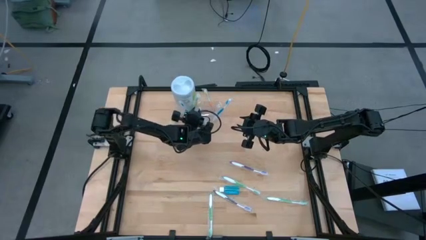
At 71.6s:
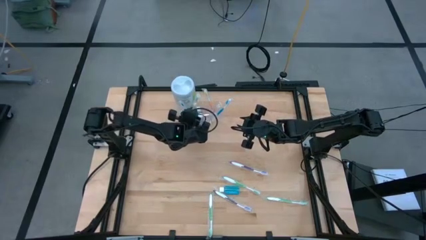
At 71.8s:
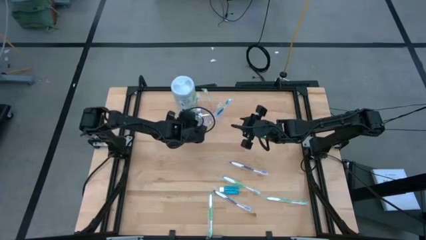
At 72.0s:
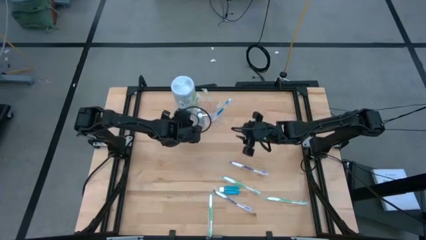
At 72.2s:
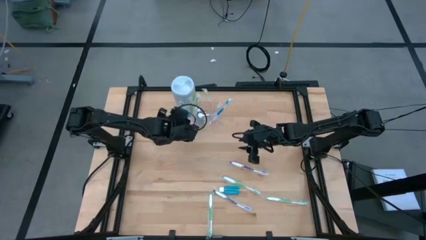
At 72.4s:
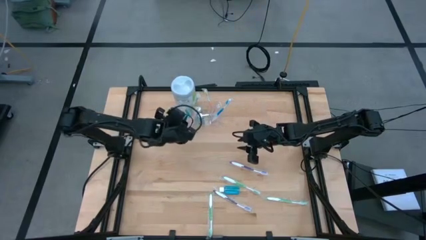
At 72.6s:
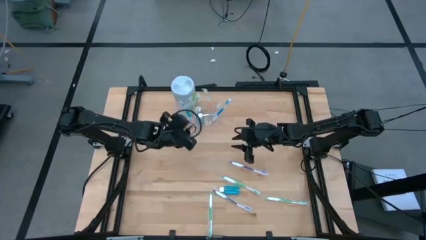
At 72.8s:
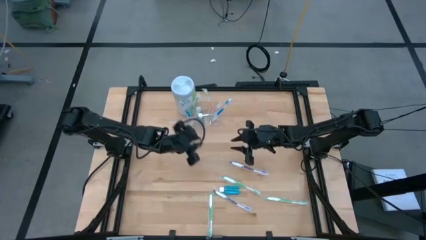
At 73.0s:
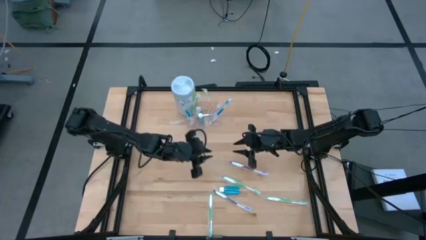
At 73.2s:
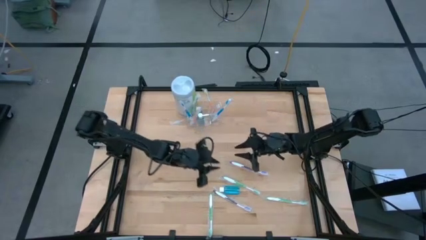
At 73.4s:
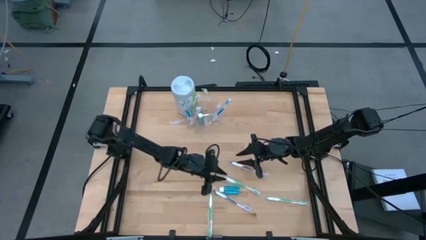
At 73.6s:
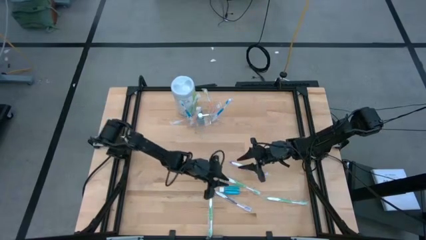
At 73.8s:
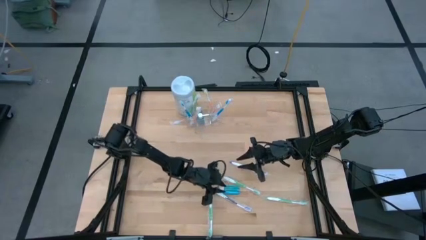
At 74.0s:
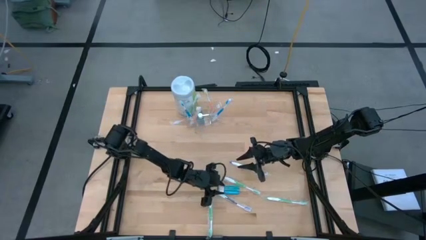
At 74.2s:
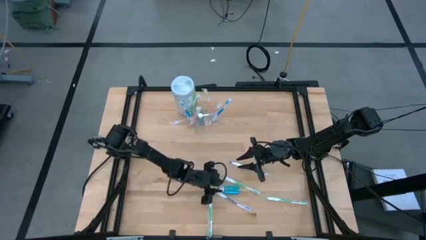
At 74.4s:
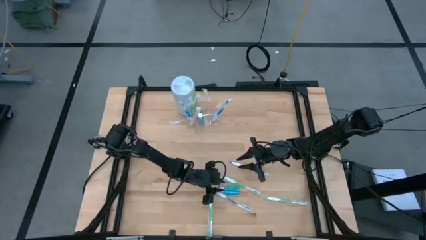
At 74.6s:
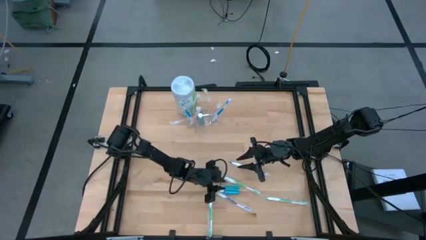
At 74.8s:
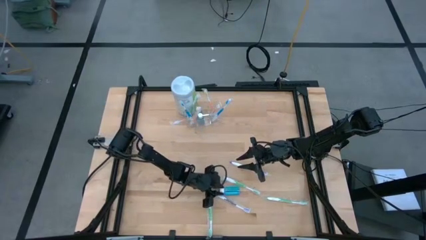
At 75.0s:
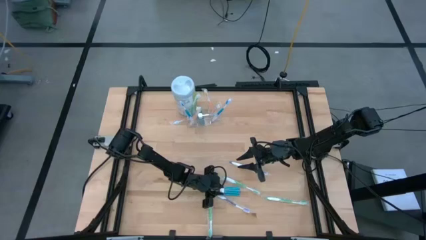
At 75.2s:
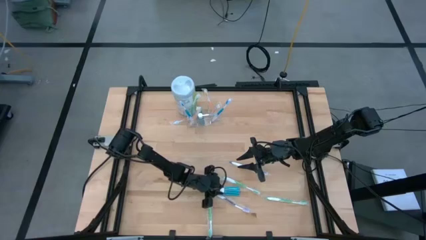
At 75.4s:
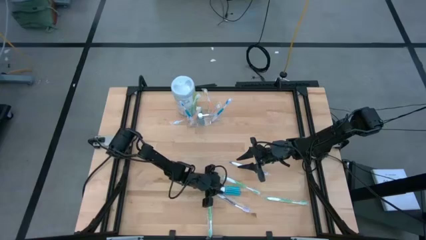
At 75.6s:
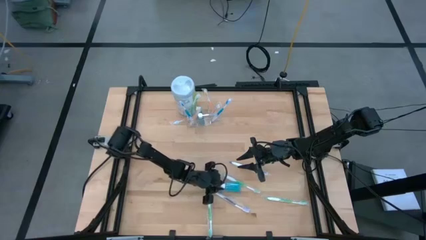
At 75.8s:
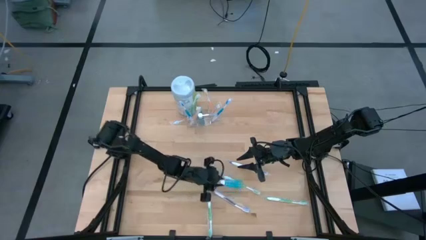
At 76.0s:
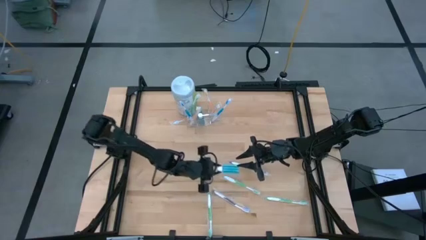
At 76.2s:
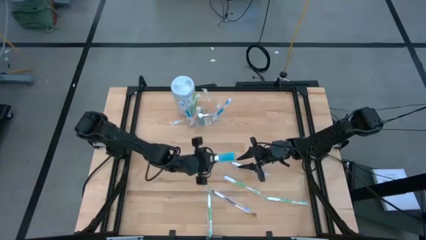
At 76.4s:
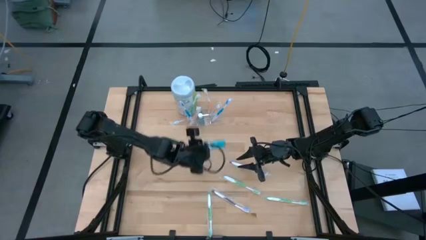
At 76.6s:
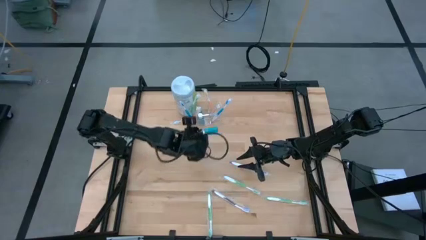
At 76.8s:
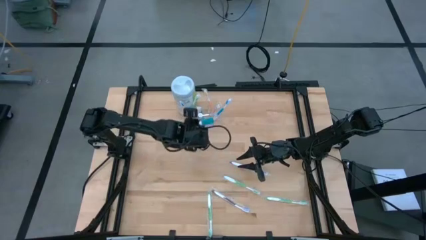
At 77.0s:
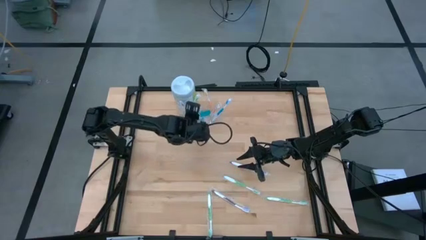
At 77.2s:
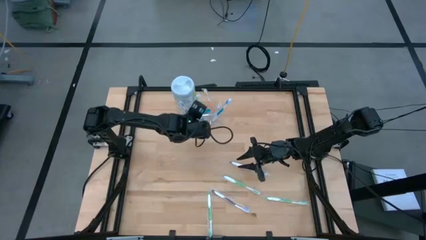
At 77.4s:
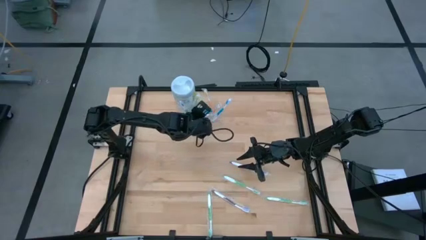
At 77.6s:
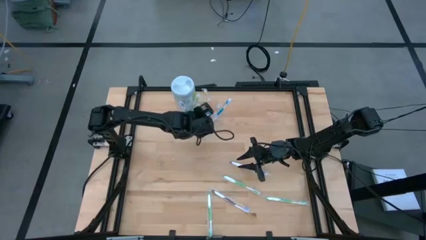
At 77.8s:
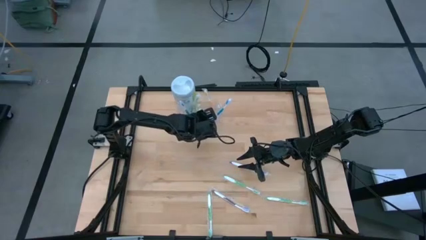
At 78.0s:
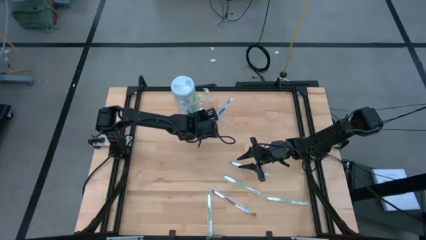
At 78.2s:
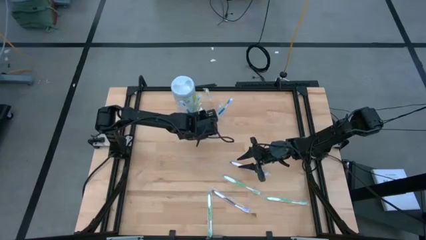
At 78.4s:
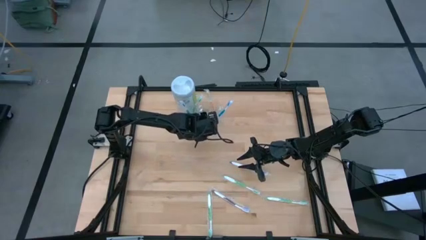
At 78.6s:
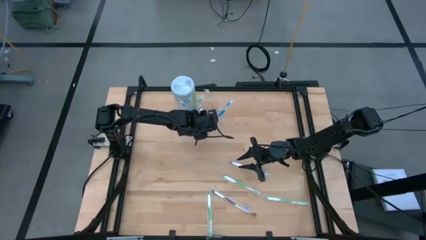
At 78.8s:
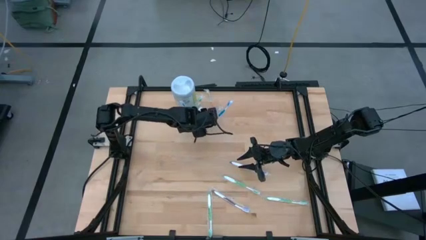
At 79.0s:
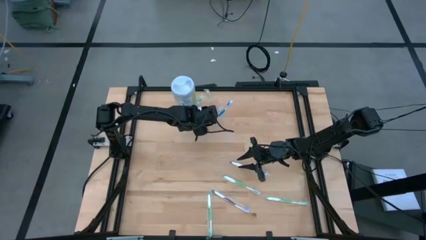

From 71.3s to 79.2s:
Task: Pick & Place toothbrushing station
Put the mouthwash into the transparent organizer

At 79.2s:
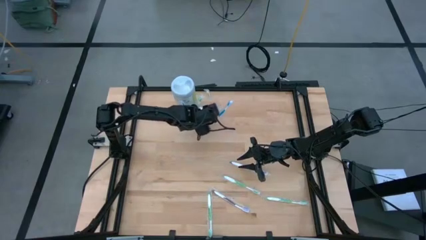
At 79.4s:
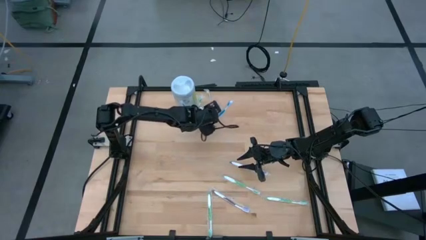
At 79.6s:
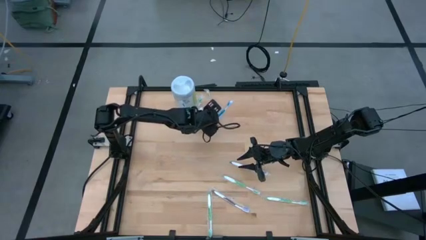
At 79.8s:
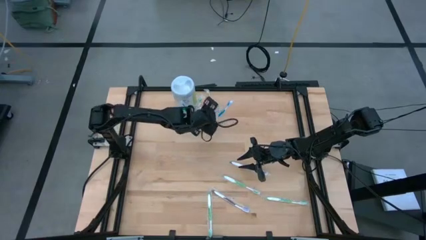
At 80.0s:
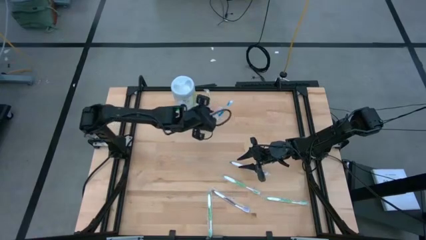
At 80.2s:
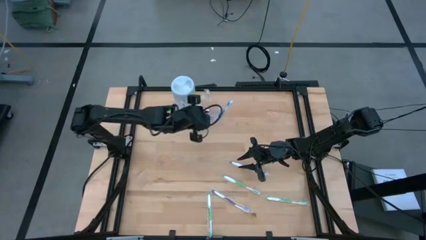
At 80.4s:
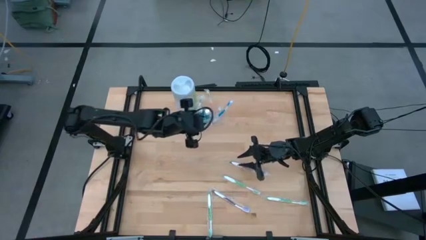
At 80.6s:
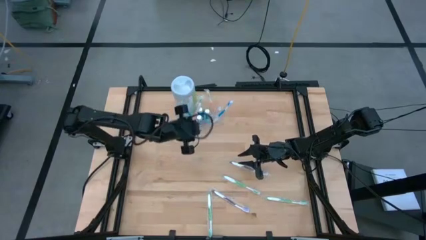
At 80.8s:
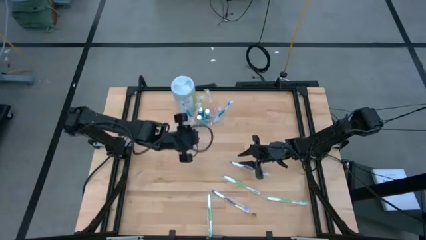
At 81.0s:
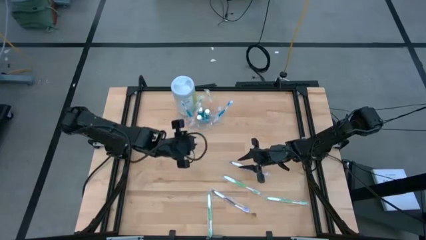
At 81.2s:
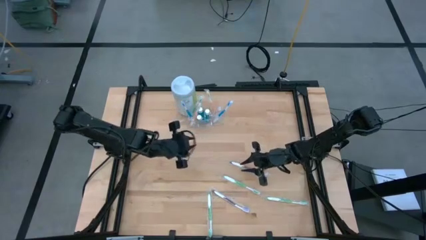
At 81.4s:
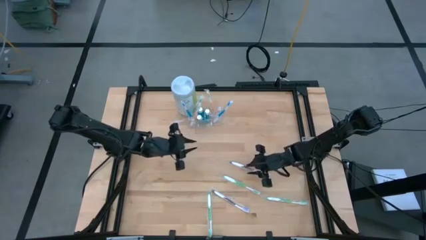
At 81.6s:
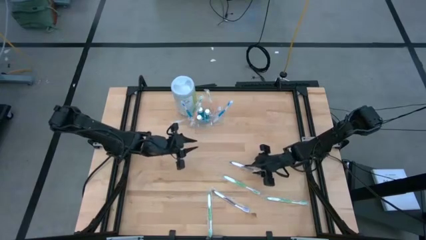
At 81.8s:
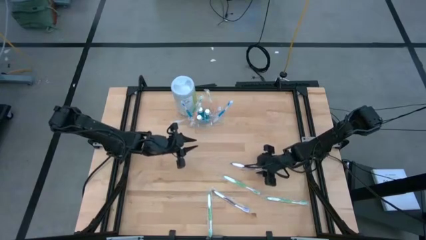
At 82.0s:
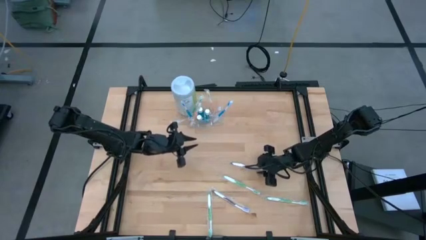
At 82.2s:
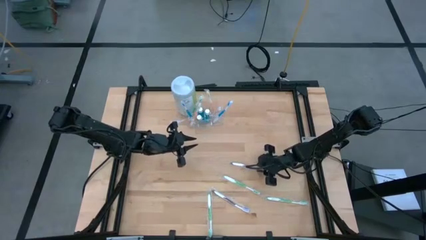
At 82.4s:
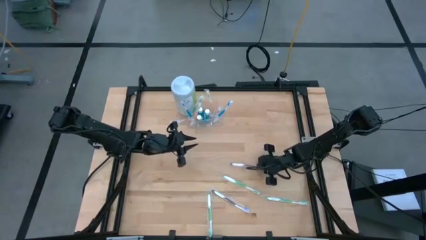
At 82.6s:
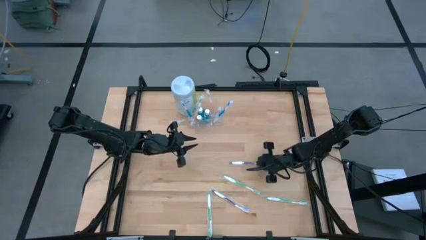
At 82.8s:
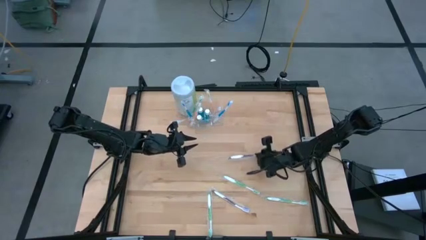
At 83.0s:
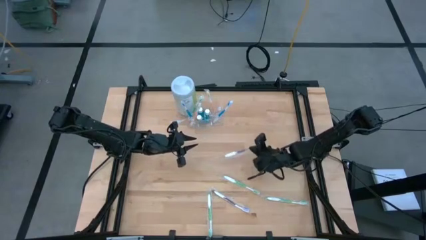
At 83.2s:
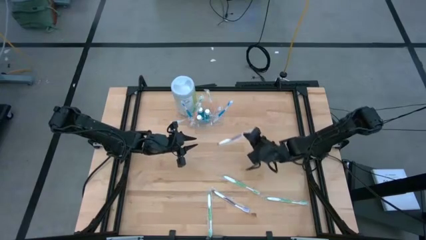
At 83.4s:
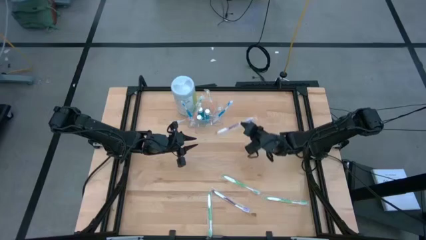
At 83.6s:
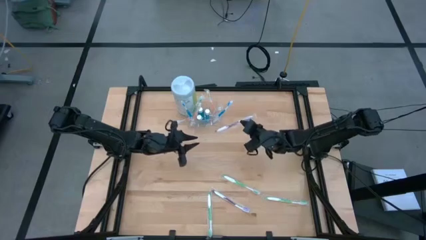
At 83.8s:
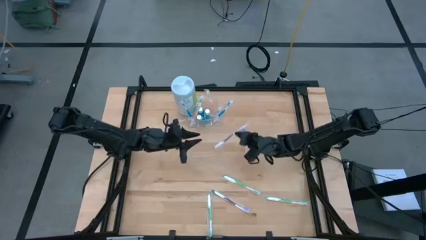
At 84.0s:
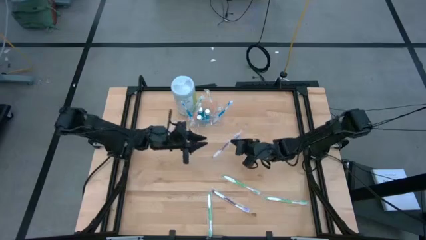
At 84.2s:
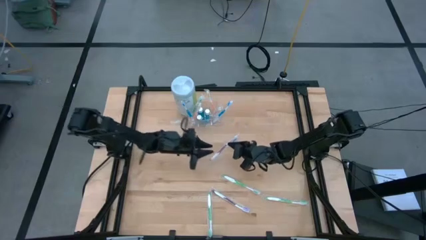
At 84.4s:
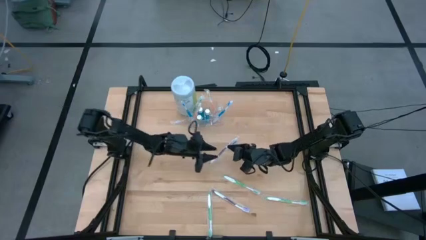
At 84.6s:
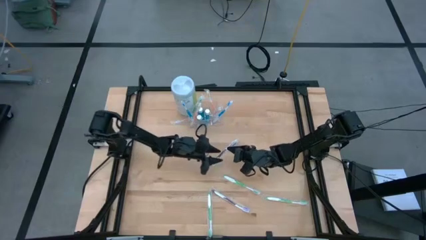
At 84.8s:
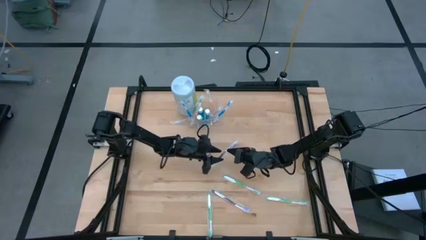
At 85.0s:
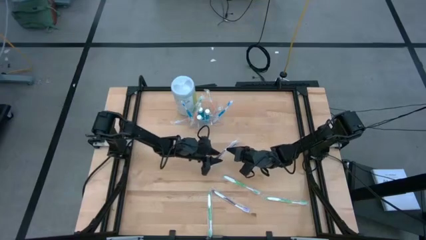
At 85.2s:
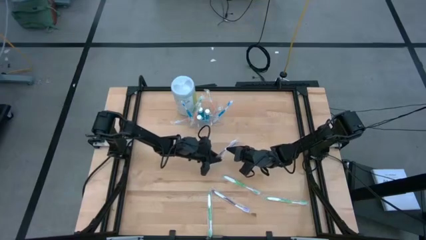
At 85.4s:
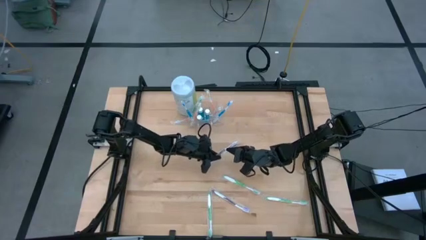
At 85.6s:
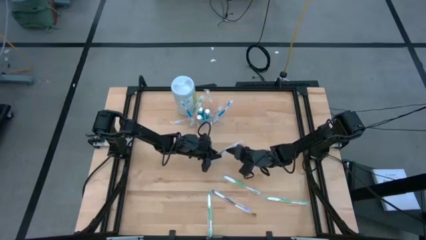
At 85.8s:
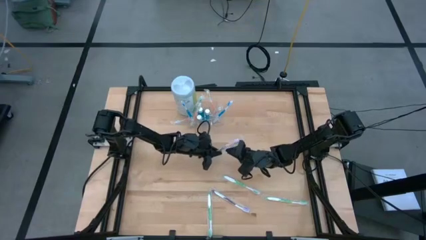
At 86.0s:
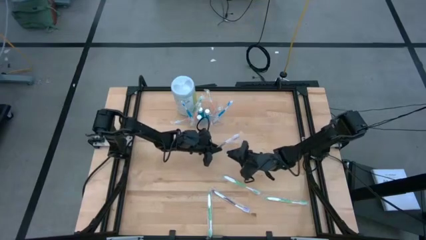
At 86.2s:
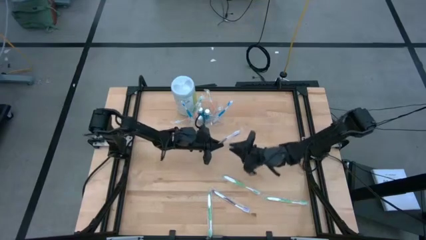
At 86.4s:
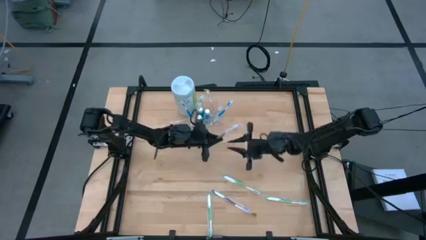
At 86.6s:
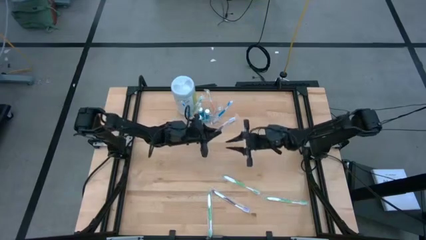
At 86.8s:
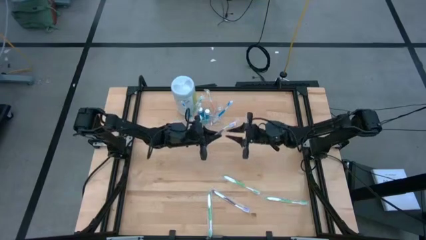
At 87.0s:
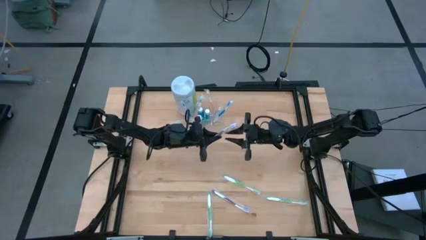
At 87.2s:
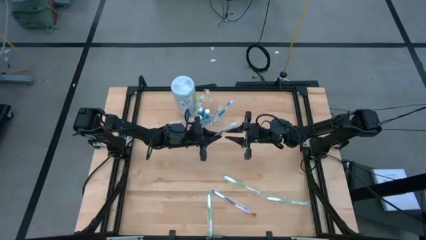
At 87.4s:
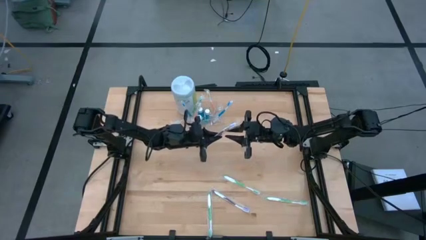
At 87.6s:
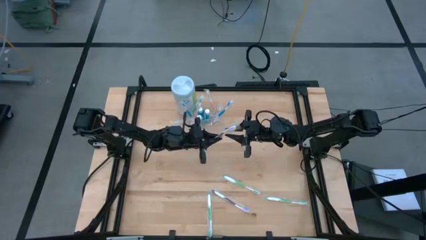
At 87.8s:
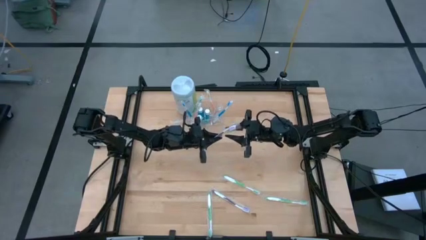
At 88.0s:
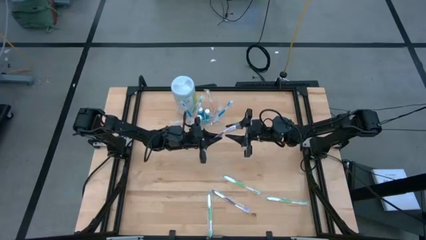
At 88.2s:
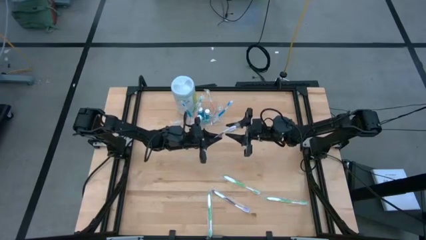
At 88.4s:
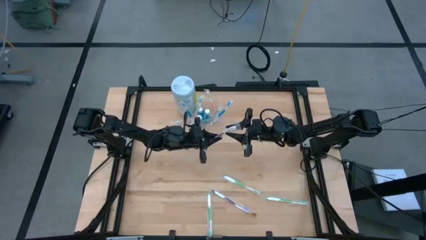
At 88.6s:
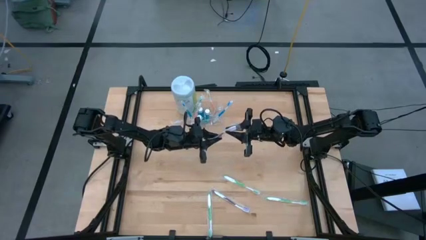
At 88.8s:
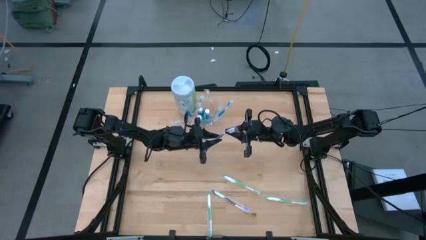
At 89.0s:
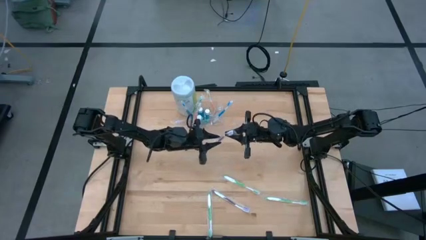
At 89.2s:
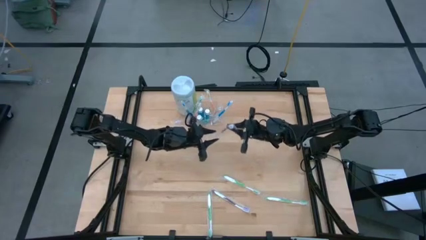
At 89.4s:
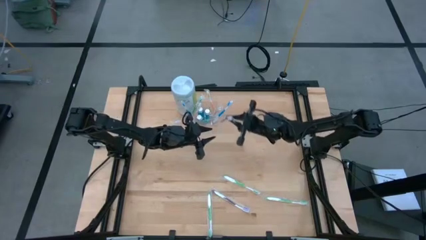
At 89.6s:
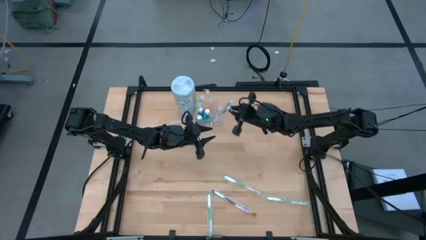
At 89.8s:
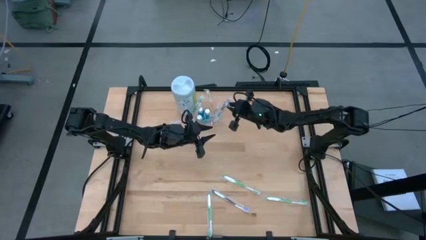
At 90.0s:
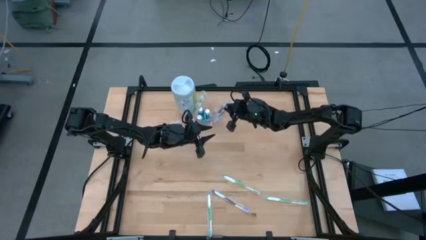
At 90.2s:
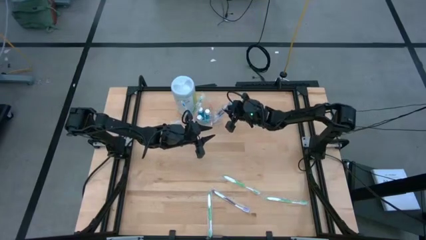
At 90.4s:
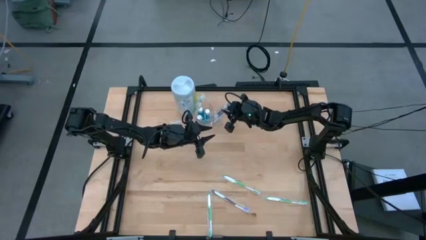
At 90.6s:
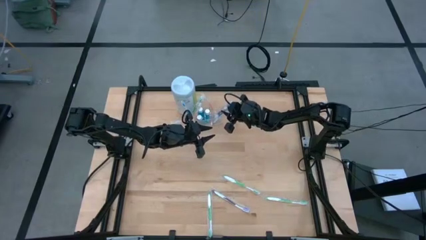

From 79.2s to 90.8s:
Put the purple toothbrush into the transparent organizer
